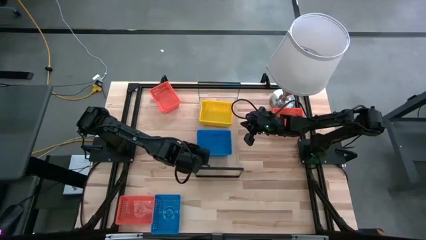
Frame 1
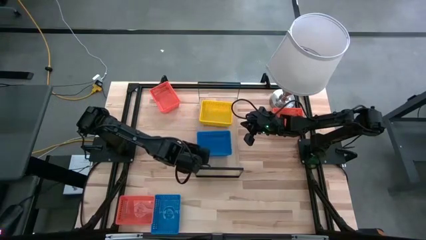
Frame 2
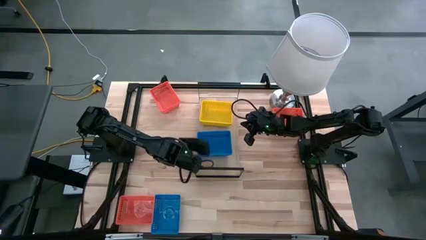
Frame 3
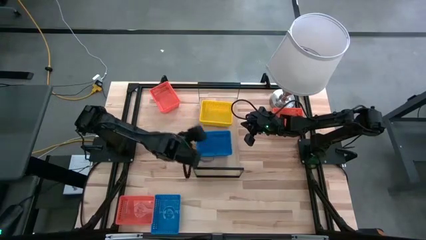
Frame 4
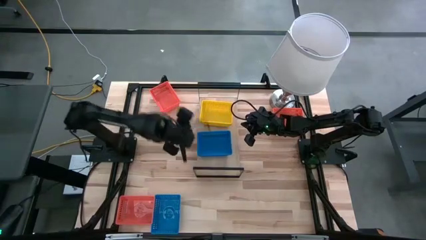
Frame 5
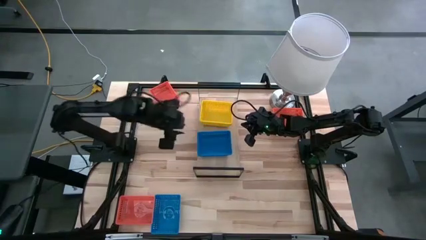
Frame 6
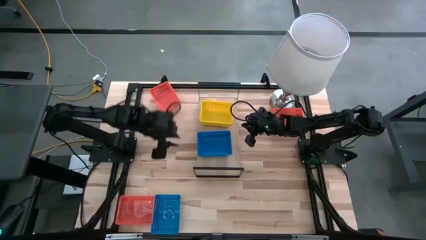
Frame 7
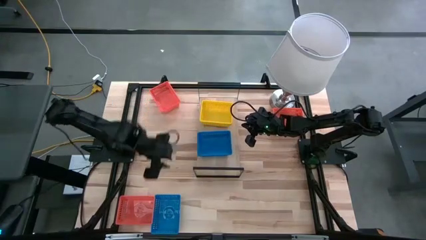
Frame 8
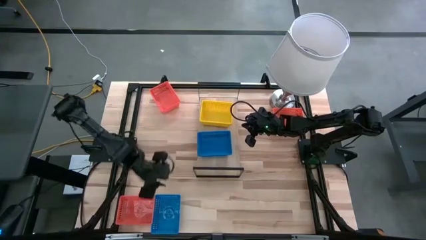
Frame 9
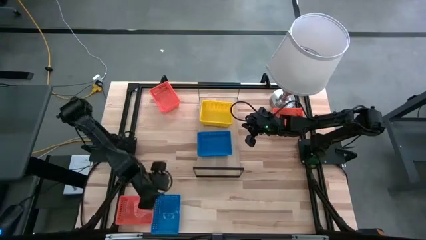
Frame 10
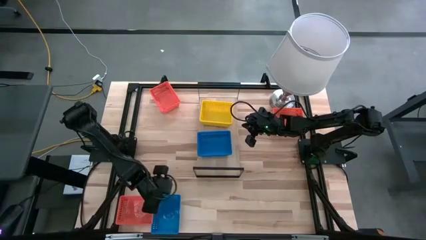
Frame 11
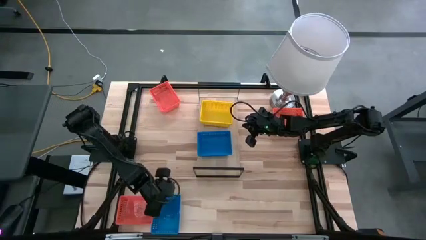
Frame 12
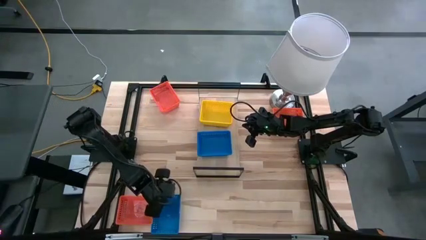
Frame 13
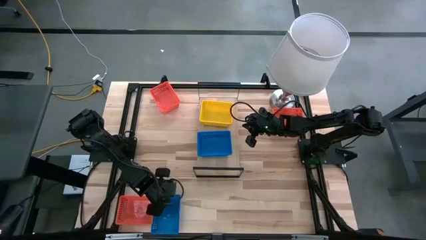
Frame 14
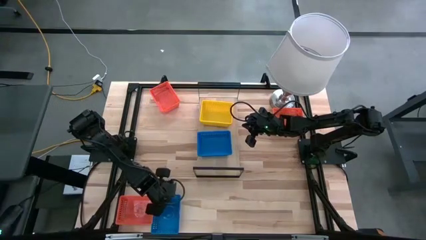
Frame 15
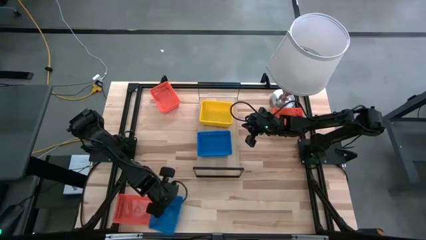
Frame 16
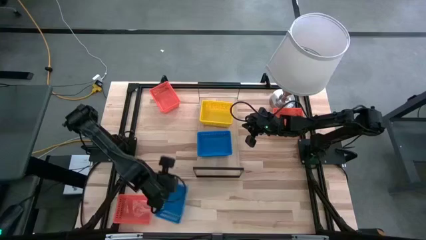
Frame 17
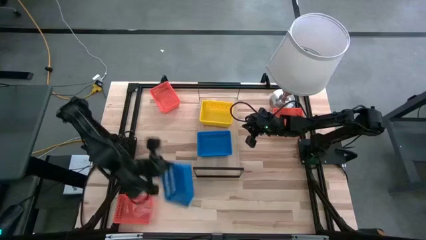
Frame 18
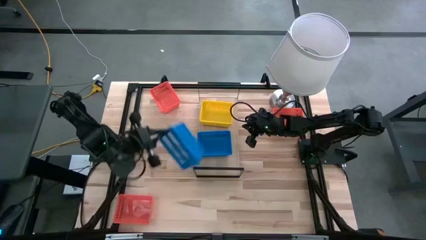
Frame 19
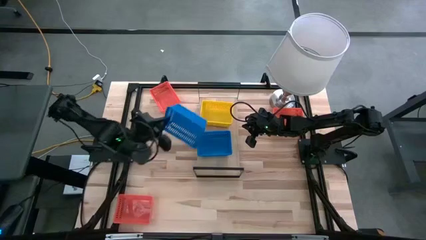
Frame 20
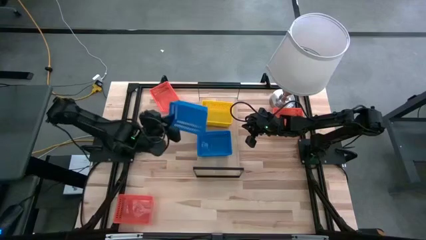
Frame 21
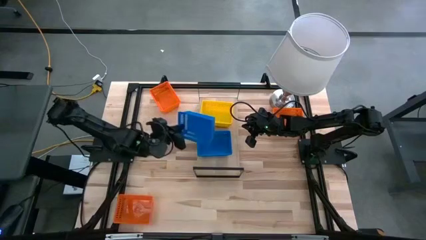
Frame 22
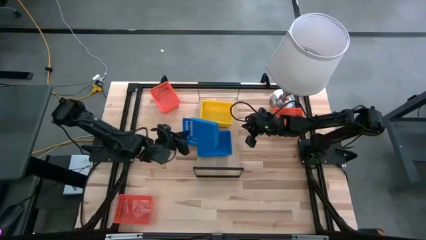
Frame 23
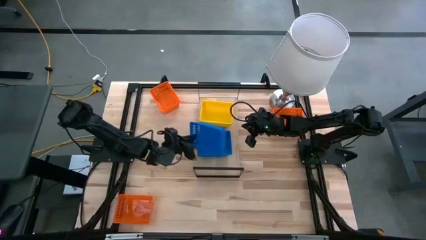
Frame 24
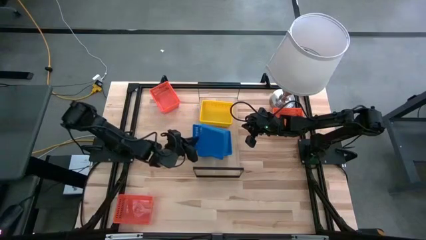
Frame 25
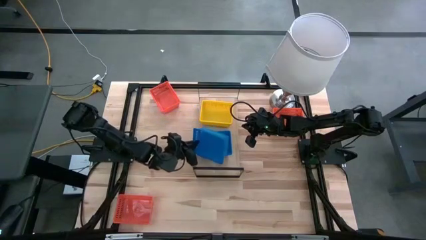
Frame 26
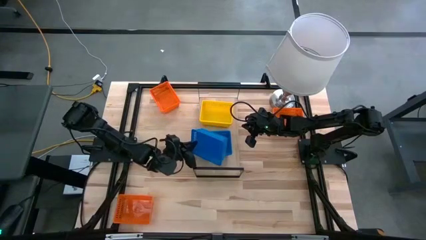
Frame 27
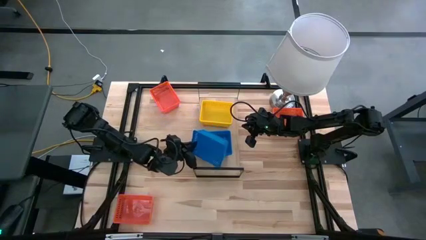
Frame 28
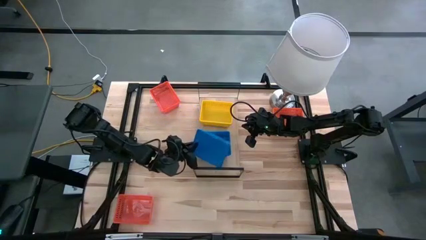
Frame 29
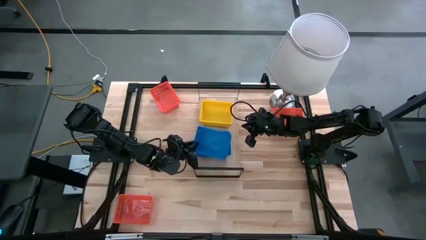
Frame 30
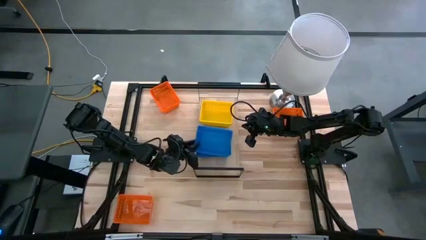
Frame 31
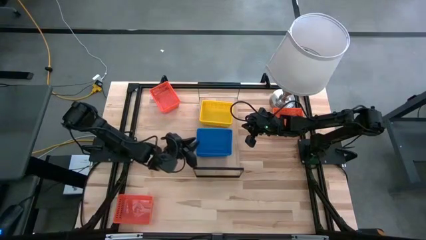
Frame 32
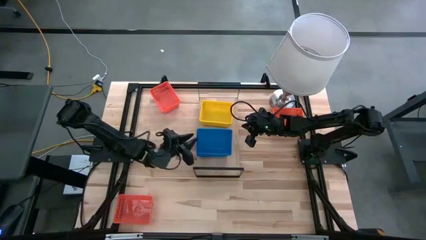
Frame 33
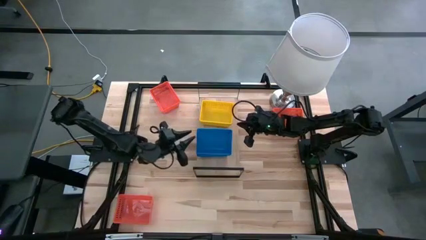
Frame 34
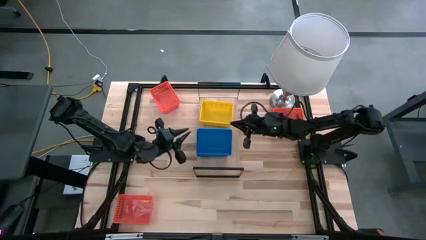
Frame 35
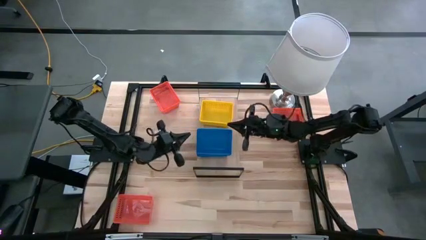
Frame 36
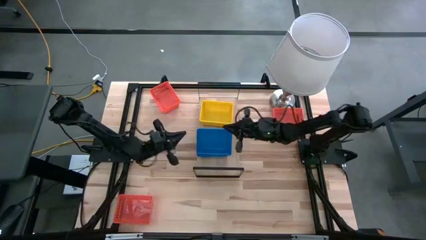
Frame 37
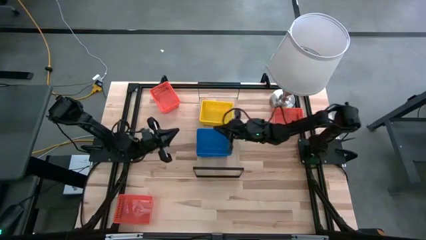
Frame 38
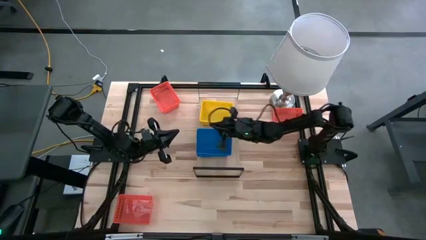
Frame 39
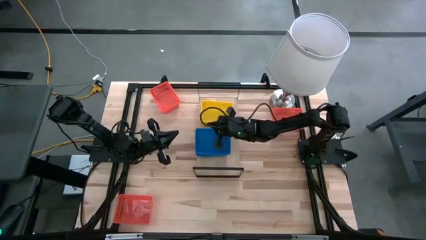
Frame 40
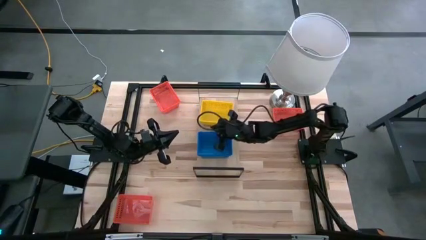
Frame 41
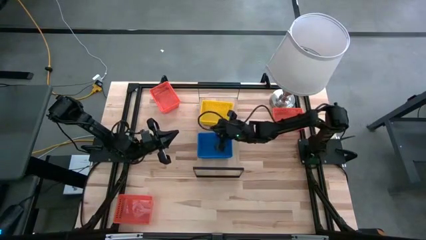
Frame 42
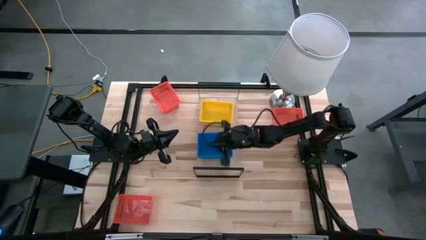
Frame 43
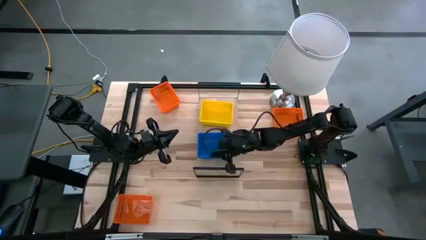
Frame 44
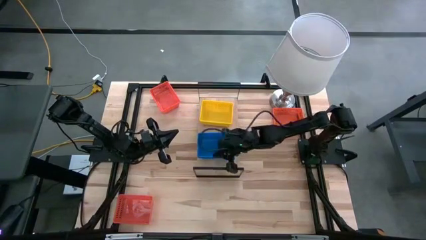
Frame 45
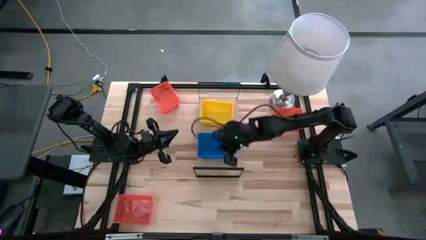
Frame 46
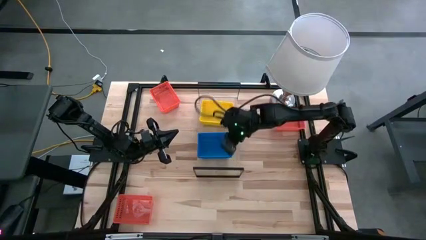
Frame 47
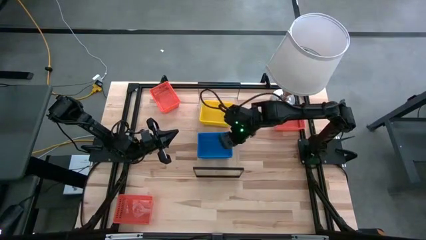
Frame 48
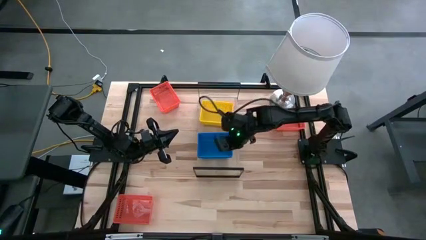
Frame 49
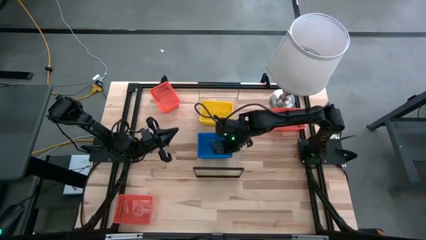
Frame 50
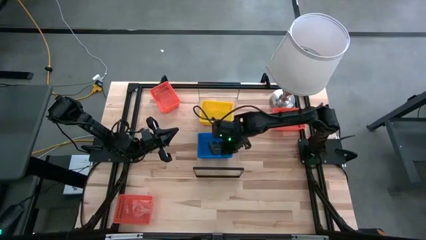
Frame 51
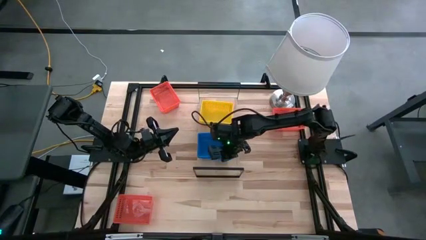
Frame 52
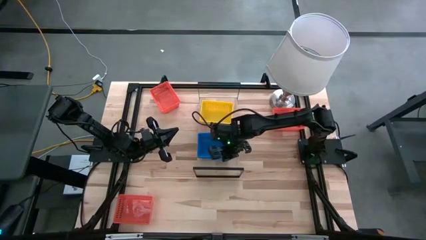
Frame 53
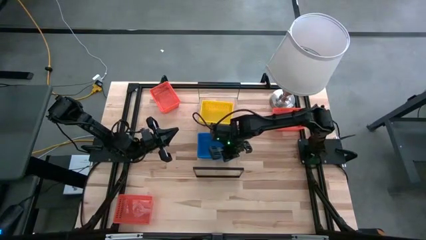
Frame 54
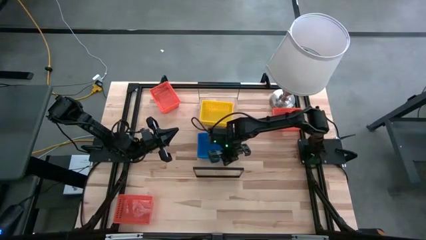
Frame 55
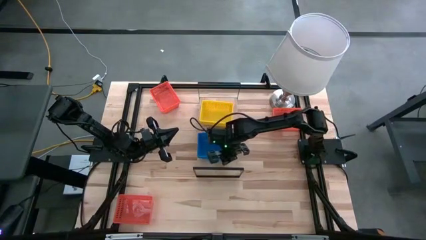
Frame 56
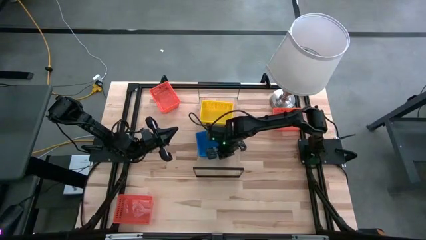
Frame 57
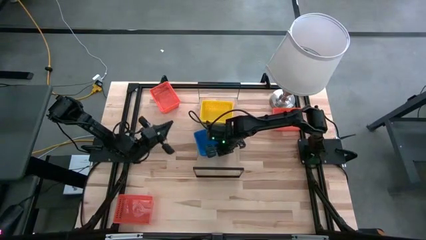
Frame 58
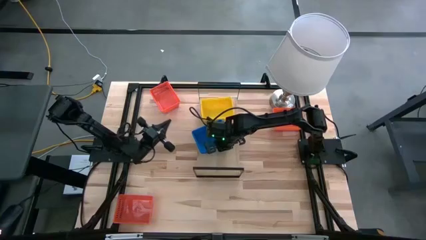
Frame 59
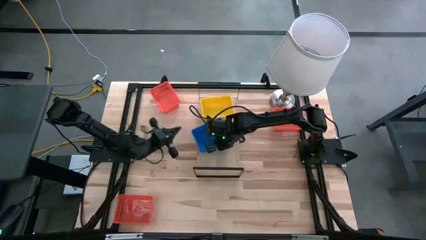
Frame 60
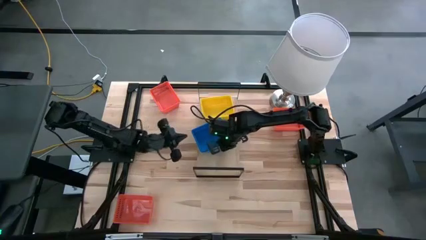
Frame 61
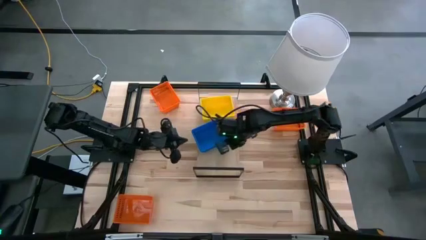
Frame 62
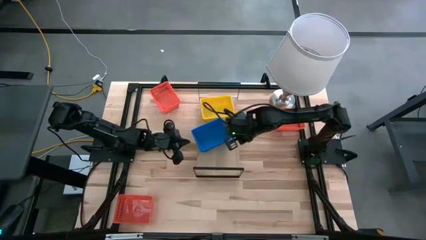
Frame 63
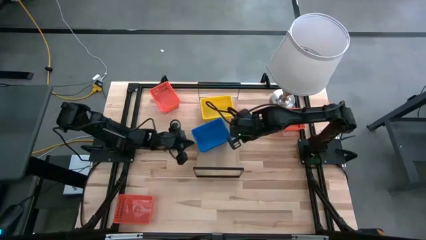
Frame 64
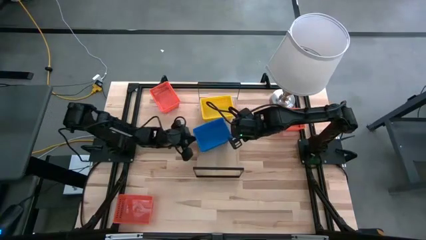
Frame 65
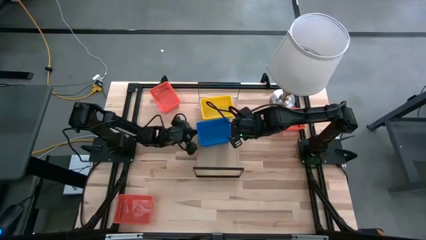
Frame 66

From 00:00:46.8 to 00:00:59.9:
Task: Stack baskets on shelf by color
Stack the blue bin on top of the blue bin on the shelf

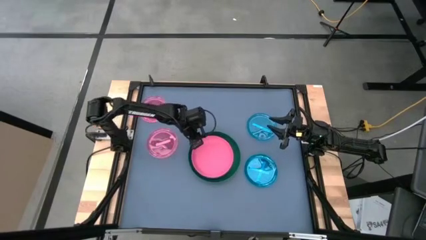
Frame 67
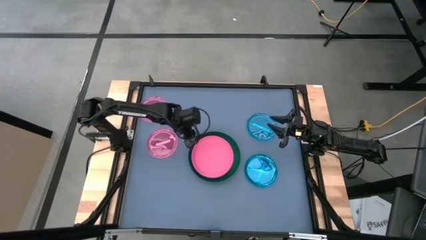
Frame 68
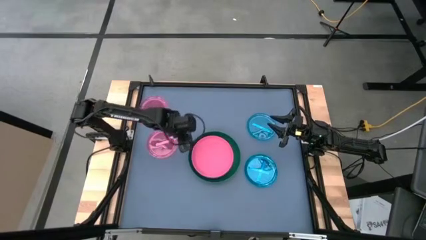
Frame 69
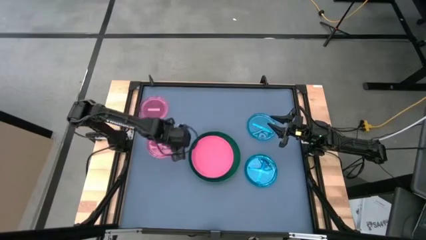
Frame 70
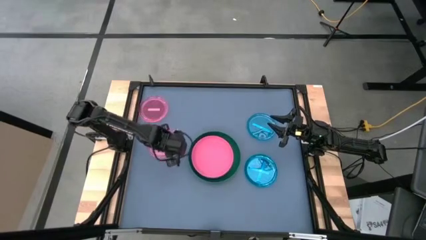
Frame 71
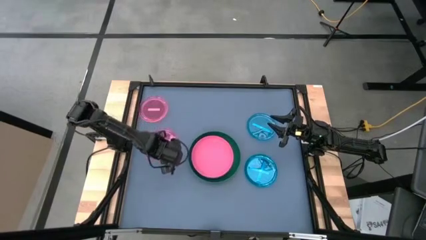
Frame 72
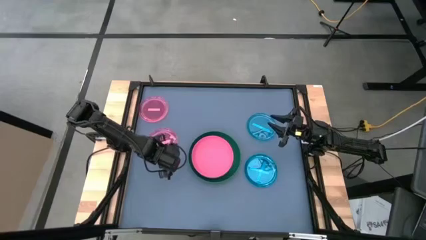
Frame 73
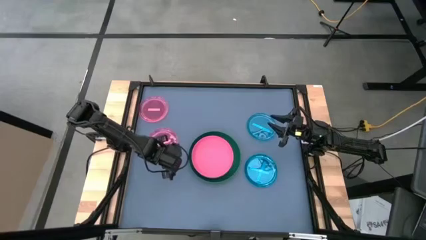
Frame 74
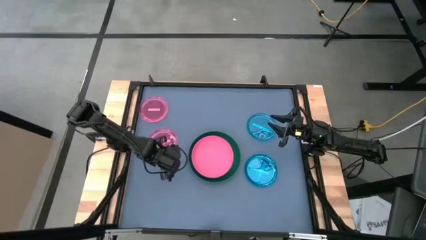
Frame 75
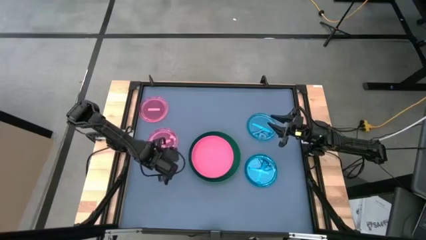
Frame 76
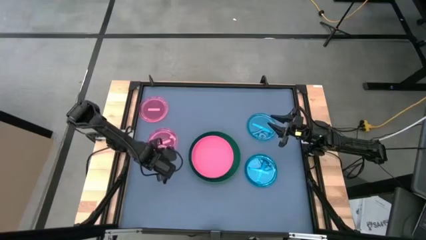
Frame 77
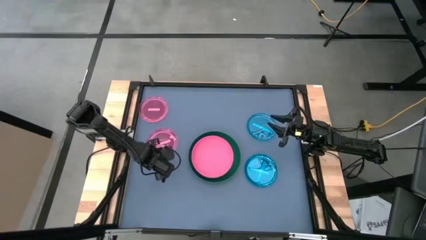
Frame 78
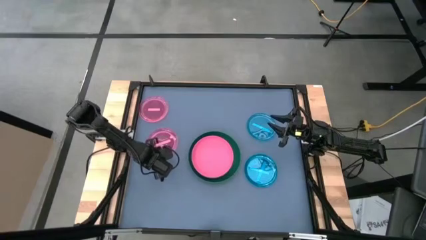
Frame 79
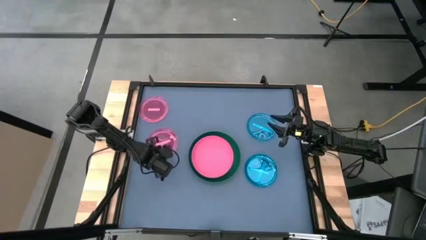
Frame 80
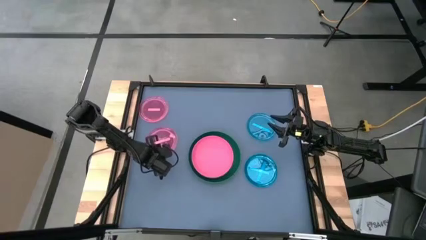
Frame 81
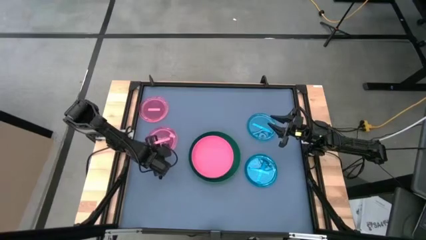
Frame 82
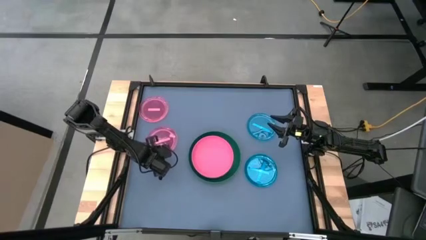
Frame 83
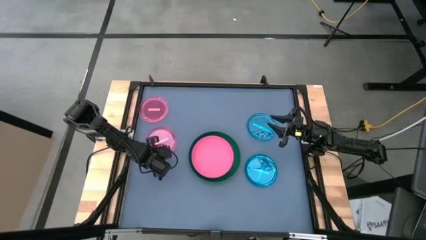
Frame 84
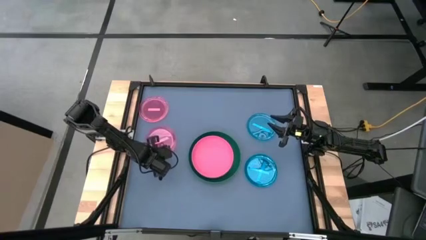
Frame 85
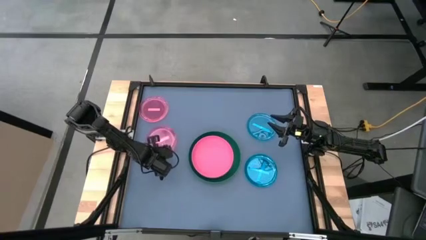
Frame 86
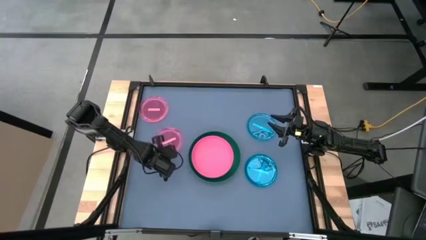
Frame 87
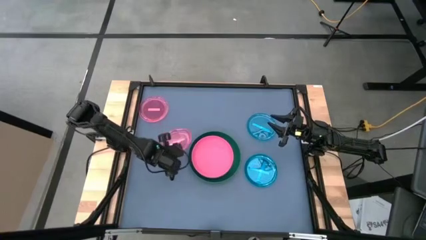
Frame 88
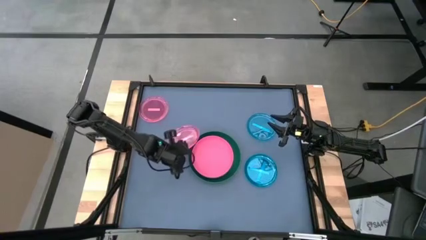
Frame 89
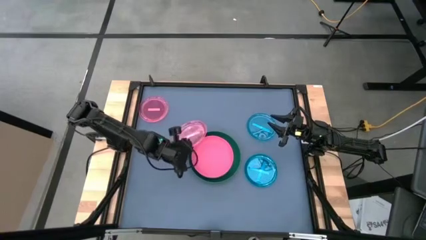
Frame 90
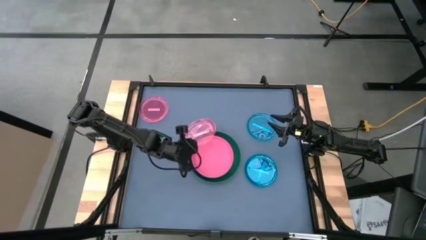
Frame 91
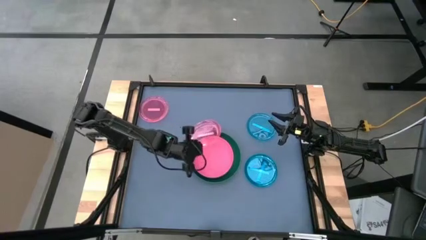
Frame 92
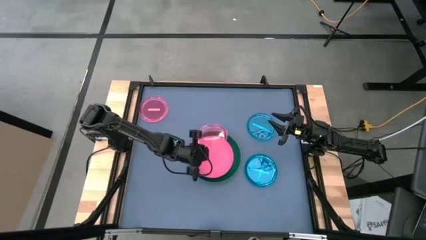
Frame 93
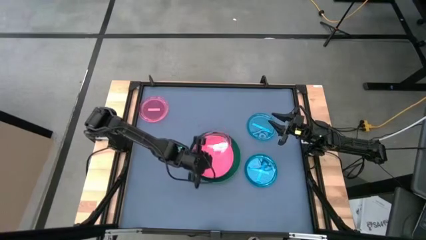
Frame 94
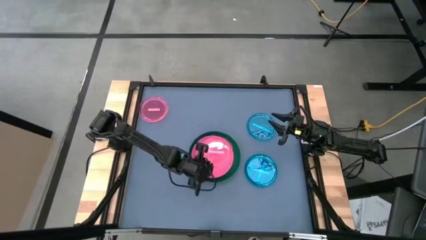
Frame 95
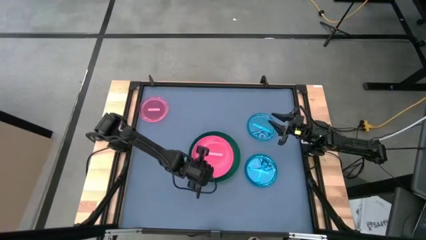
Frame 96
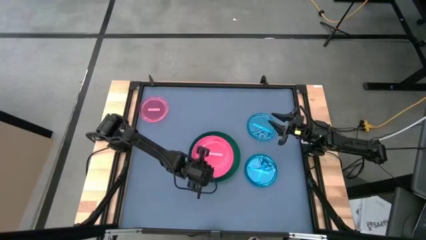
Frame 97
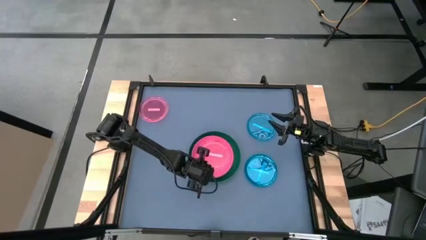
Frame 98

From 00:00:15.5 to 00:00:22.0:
Task: Stack plastic plates
Stack the bottom transparent pink plate on top of the pink plate
